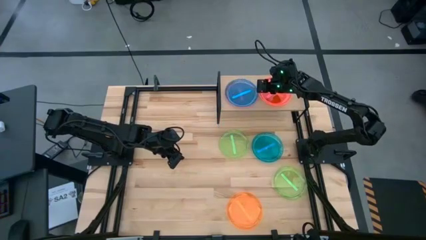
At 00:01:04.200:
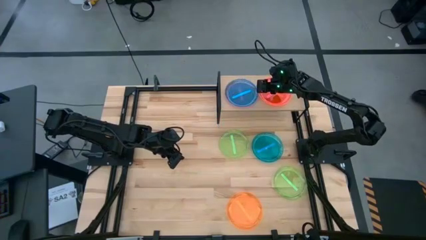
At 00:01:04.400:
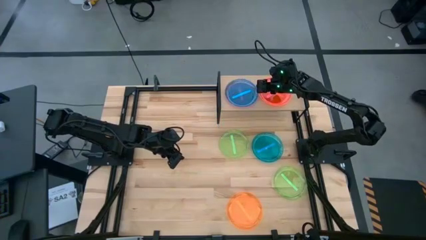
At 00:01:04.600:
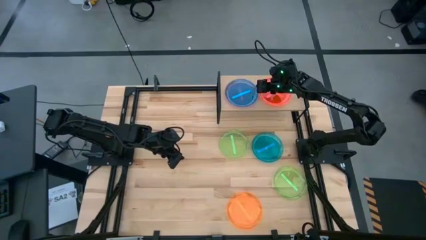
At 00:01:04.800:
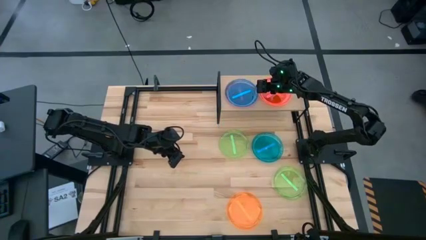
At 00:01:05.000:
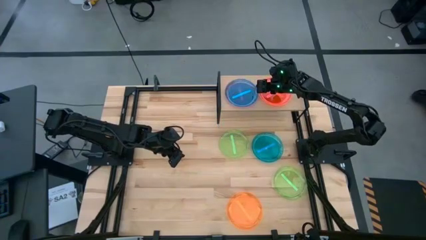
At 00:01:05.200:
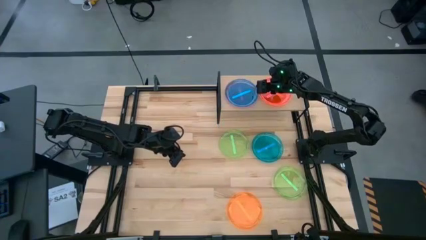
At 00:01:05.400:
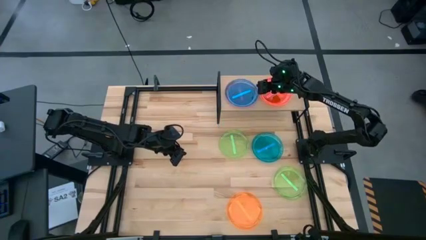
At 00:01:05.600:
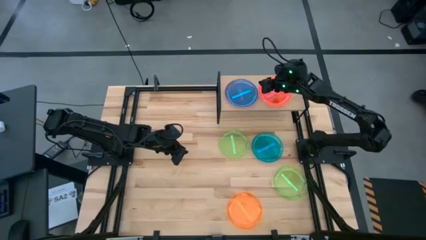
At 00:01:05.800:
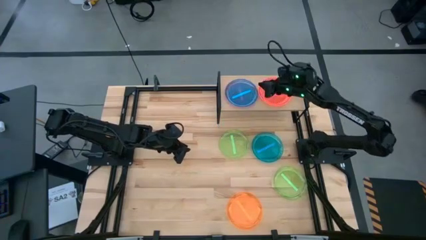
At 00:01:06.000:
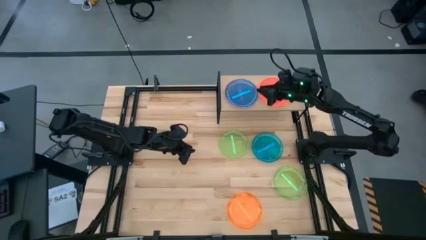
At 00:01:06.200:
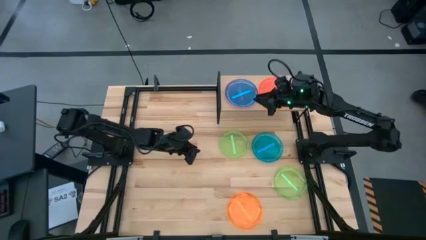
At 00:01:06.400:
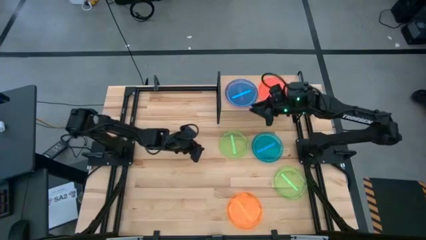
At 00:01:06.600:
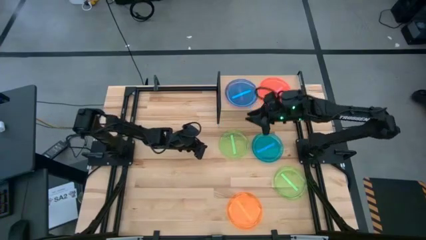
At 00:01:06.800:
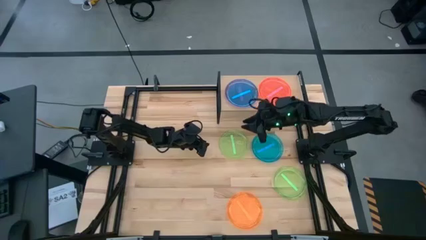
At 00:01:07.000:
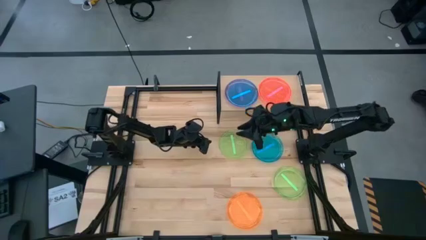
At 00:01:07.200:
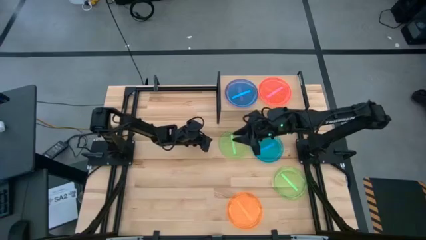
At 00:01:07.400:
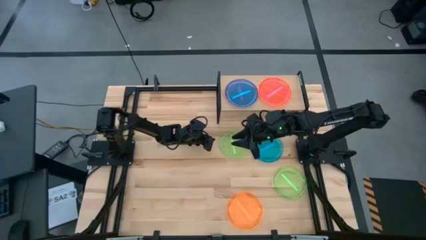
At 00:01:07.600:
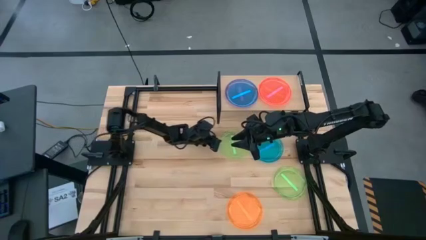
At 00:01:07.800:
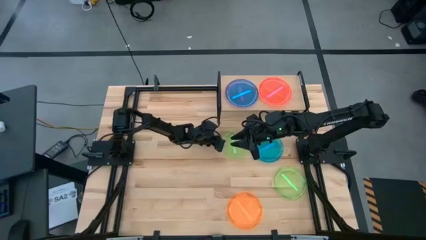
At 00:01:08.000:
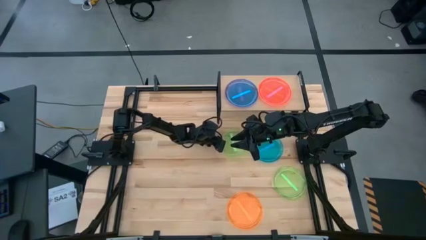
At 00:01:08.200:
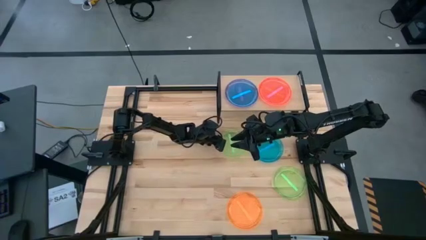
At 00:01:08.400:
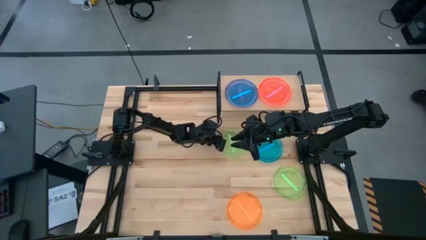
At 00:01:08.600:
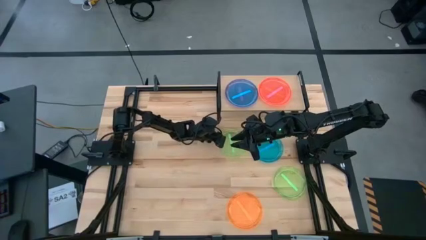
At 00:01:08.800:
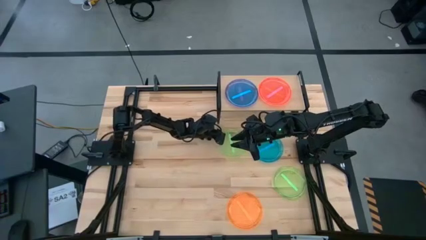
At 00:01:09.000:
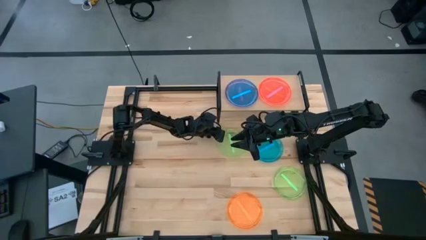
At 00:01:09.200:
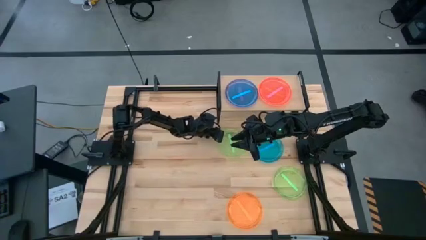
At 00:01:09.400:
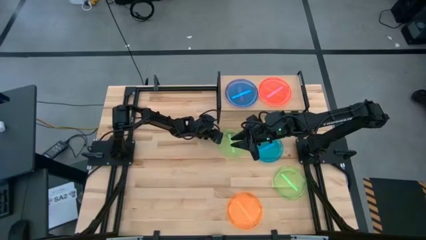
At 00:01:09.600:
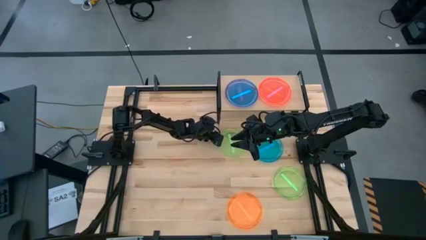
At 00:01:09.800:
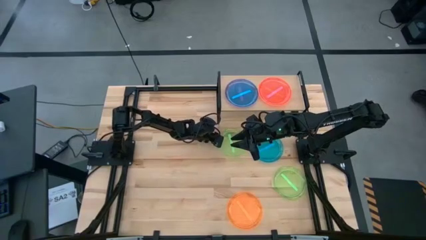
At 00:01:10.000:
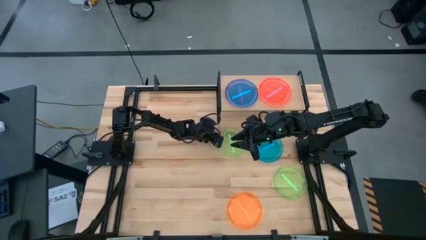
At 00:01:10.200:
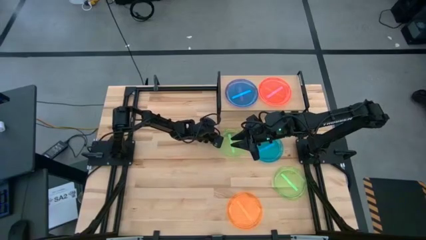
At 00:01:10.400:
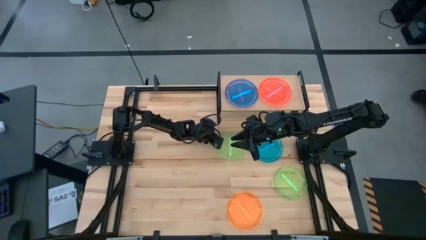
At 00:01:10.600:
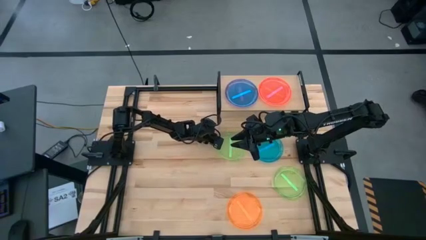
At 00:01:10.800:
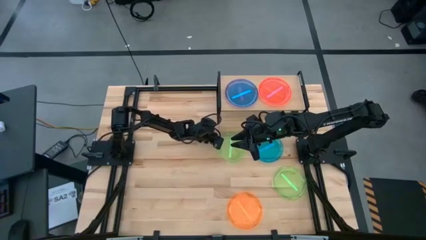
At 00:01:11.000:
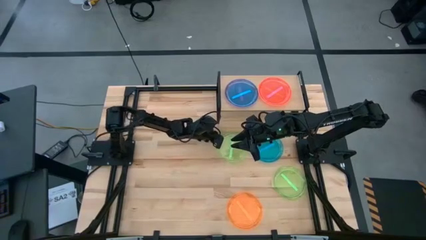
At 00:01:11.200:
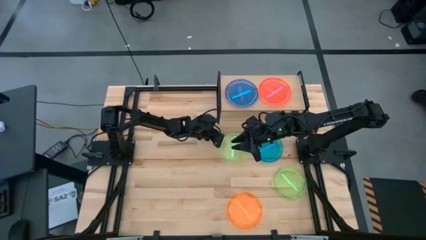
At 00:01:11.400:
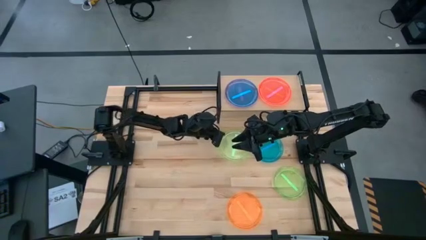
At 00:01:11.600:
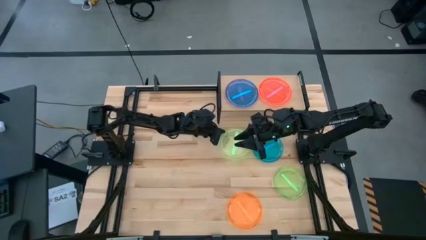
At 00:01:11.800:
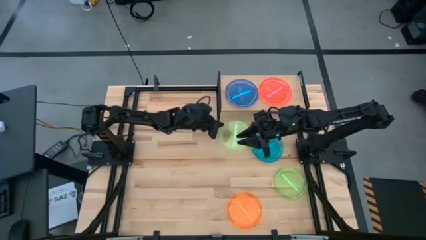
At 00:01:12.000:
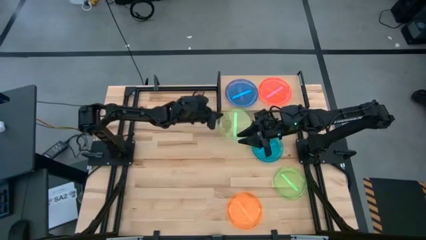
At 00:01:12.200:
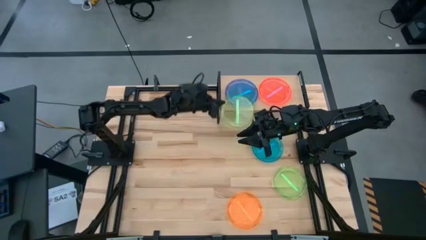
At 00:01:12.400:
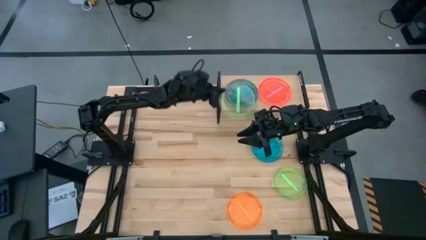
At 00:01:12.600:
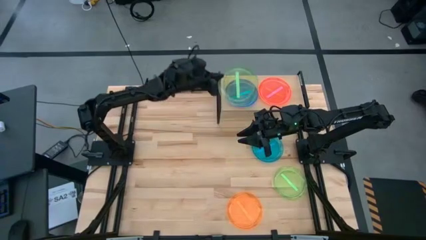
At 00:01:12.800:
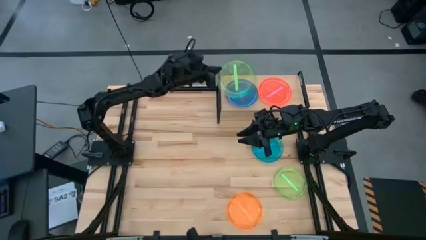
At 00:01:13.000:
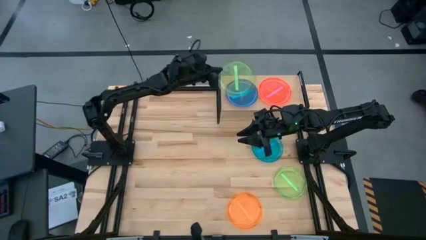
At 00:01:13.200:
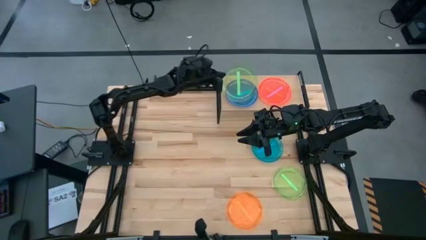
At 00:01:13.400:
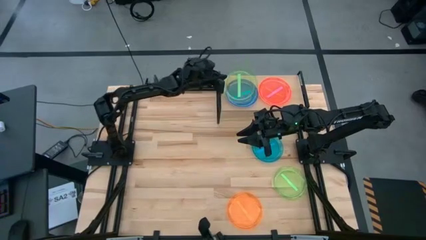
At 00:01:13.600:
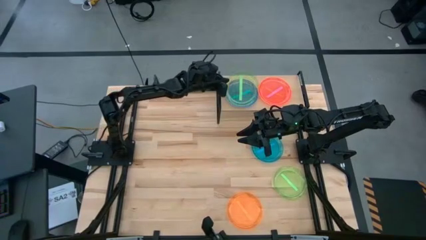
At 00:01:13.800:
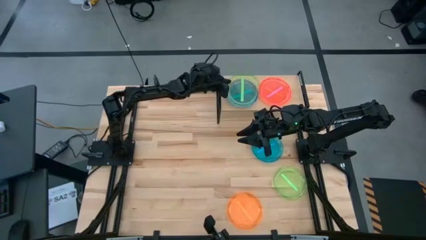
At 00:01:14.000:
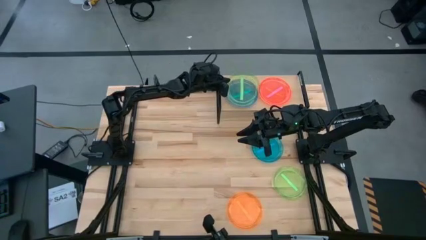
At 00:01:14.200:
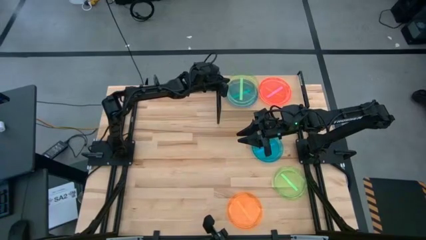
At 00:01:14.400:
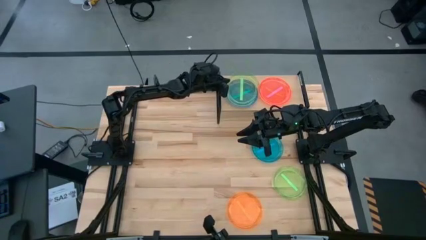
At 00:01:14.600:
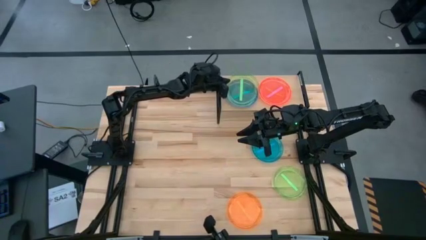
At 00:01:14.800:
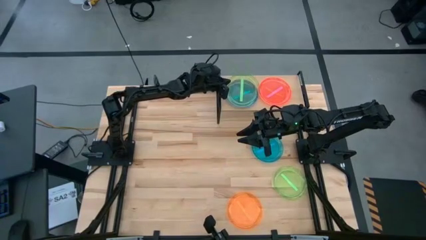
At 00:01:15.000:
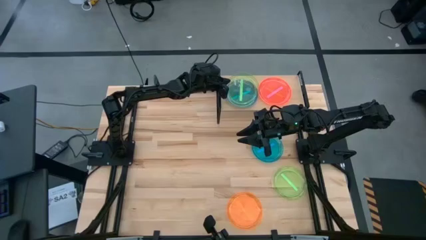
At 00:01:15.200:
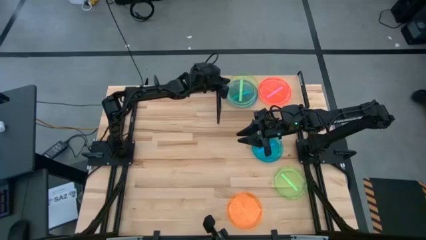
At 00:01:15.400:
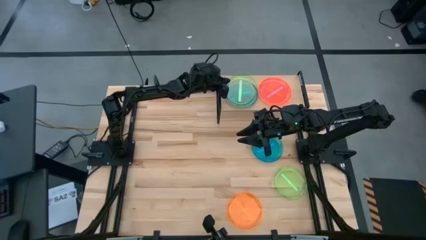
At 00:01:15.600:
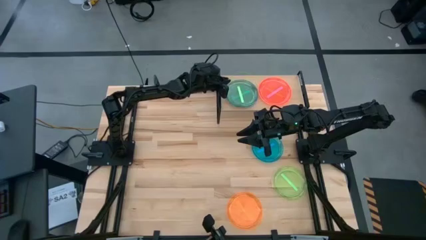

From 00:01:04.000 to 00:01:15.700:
Task: Place and stack plates onto a shelf
Stack the top green plate on top of the blue plate on the shelf
